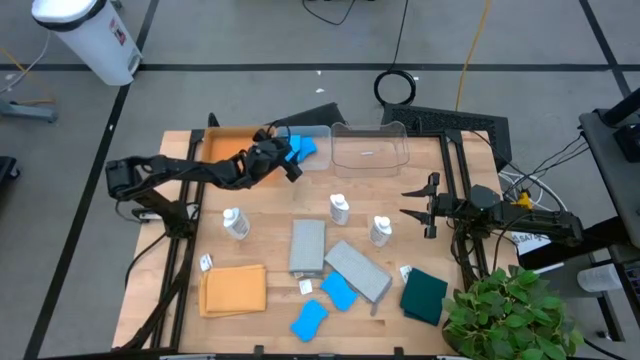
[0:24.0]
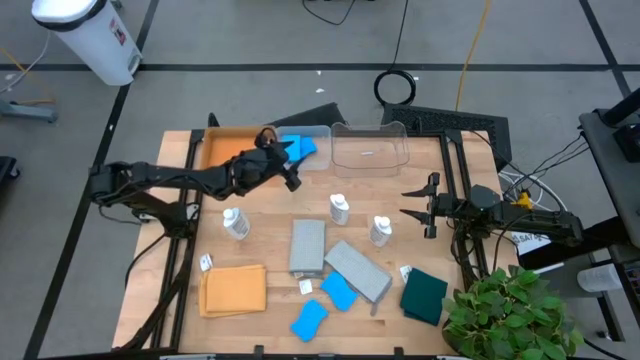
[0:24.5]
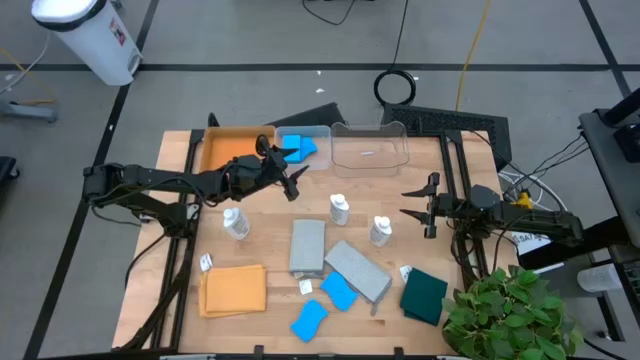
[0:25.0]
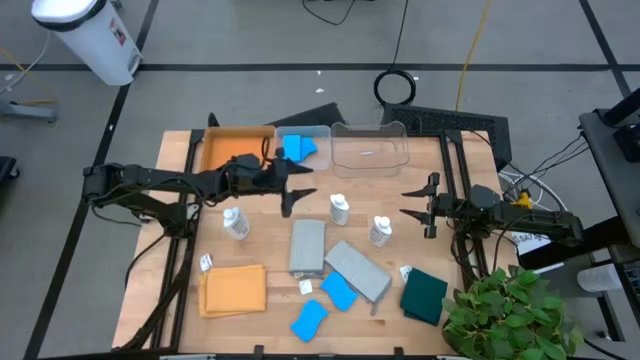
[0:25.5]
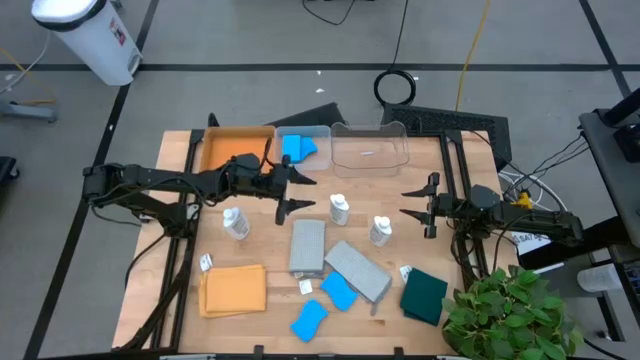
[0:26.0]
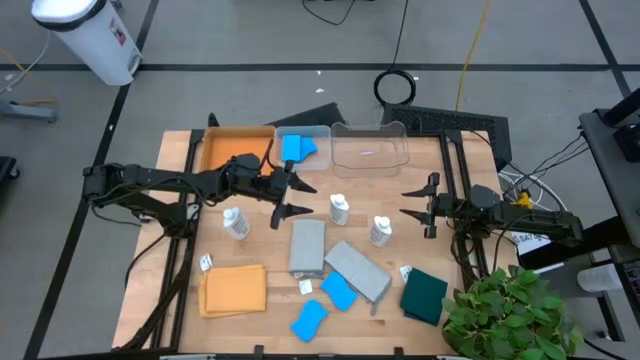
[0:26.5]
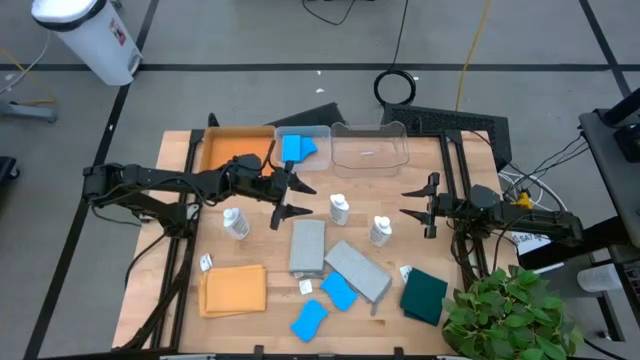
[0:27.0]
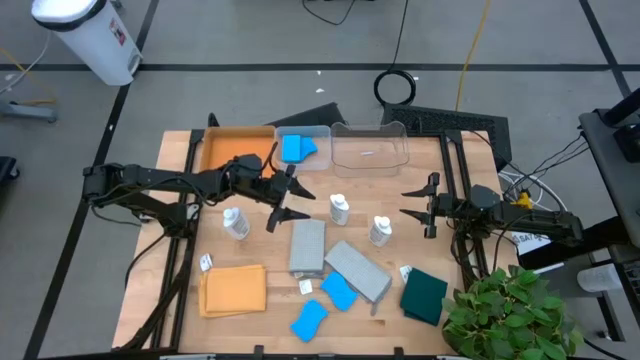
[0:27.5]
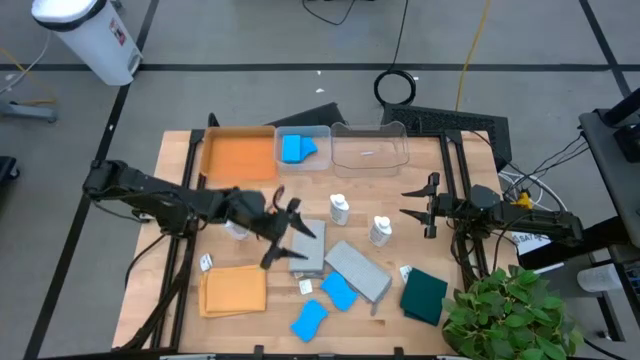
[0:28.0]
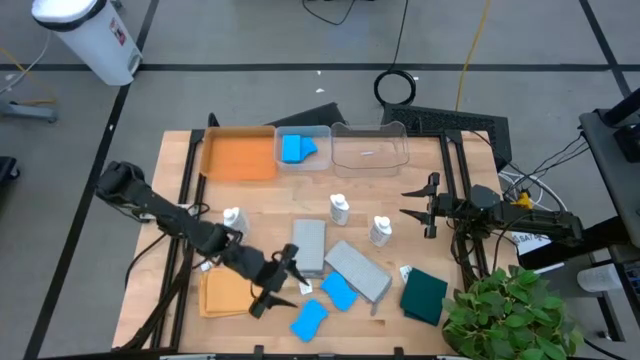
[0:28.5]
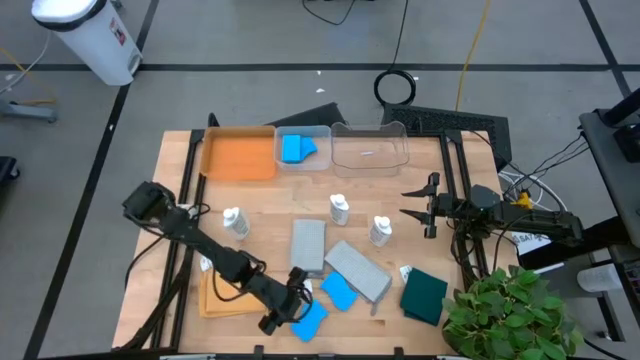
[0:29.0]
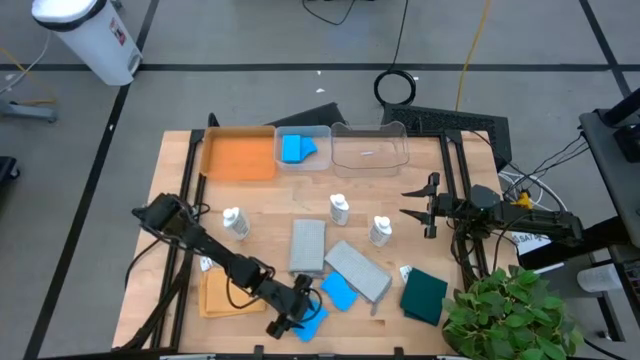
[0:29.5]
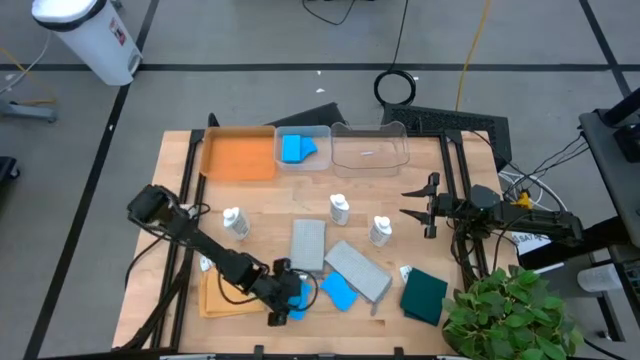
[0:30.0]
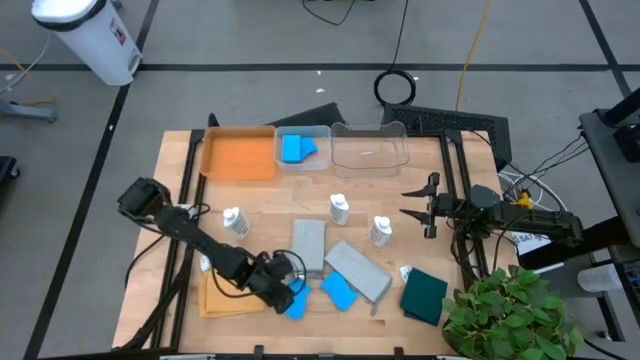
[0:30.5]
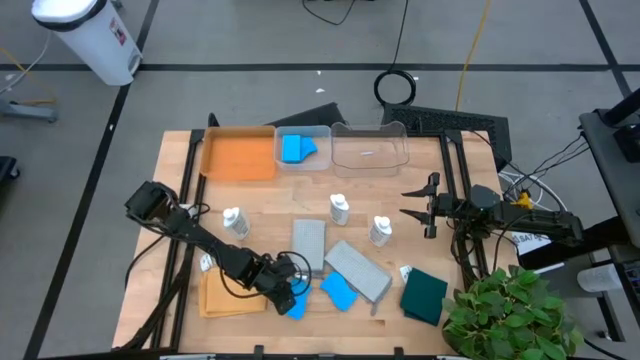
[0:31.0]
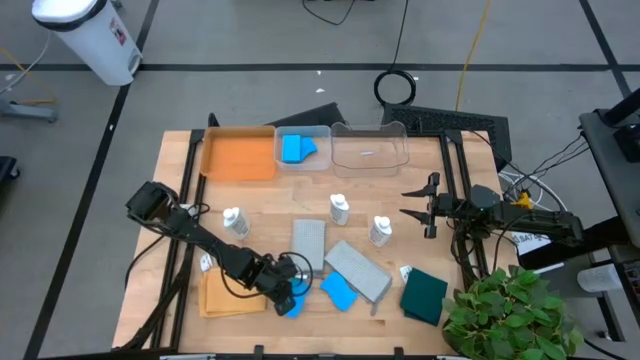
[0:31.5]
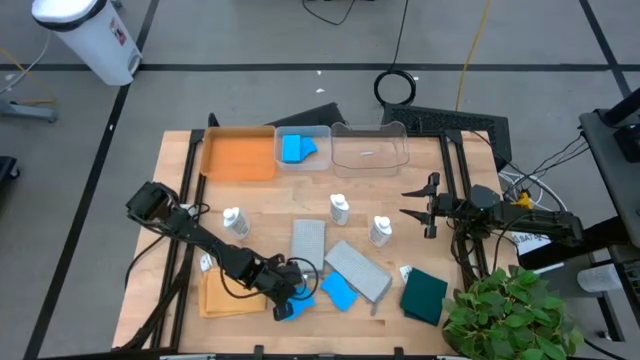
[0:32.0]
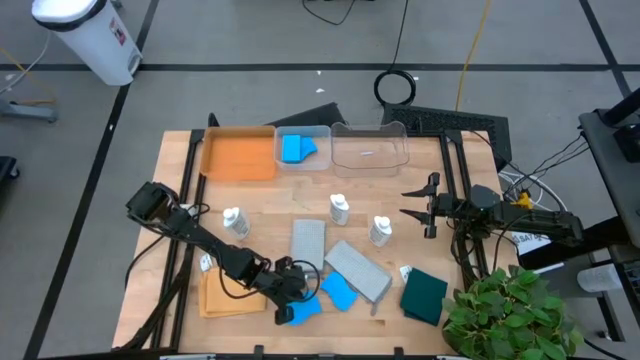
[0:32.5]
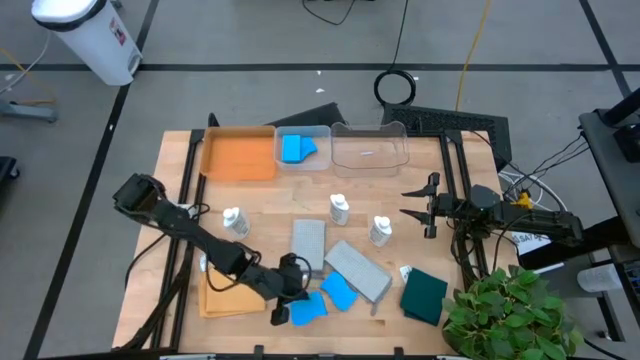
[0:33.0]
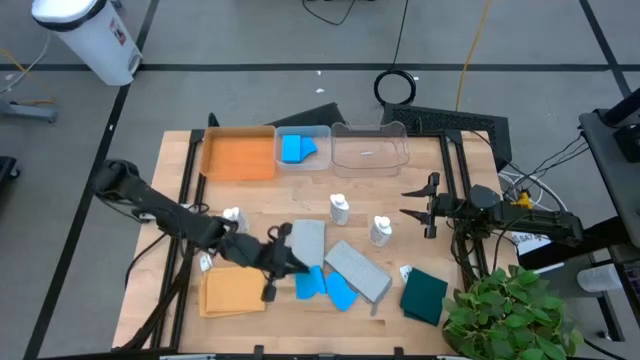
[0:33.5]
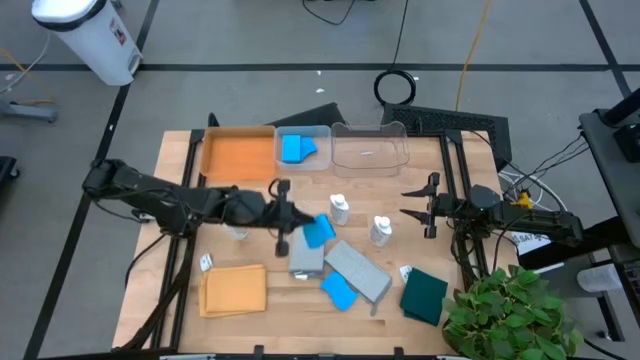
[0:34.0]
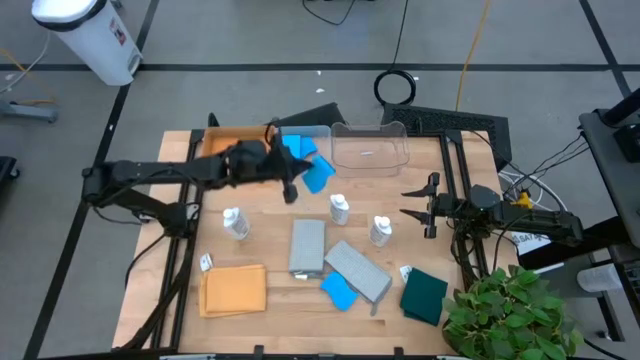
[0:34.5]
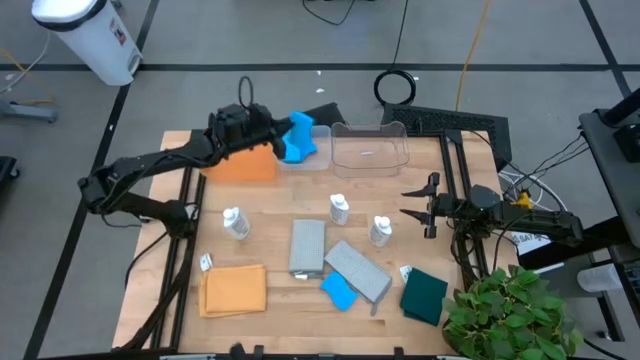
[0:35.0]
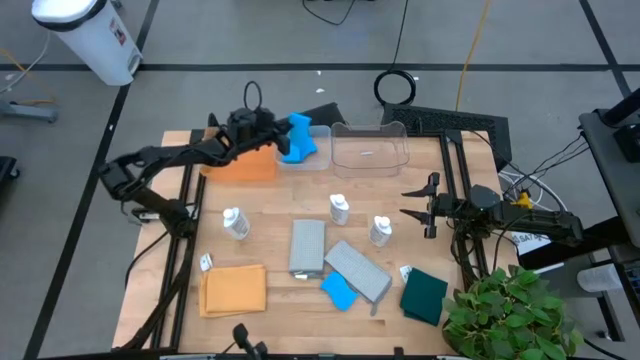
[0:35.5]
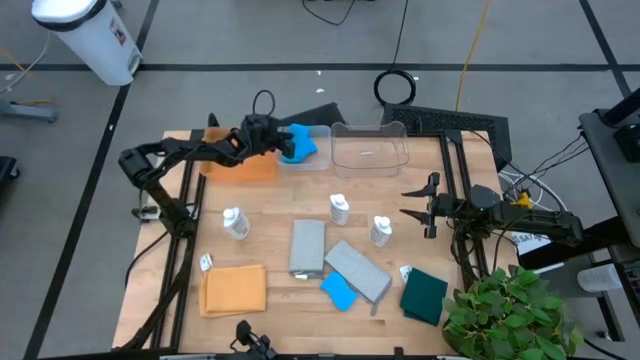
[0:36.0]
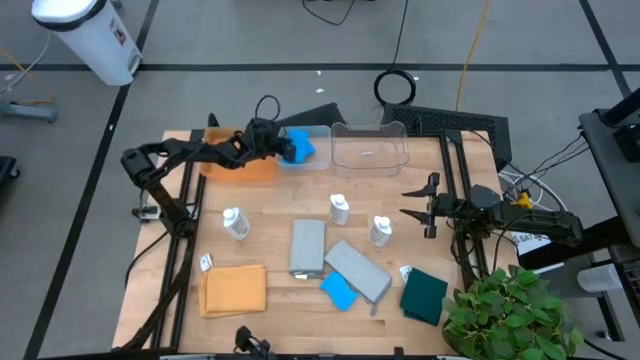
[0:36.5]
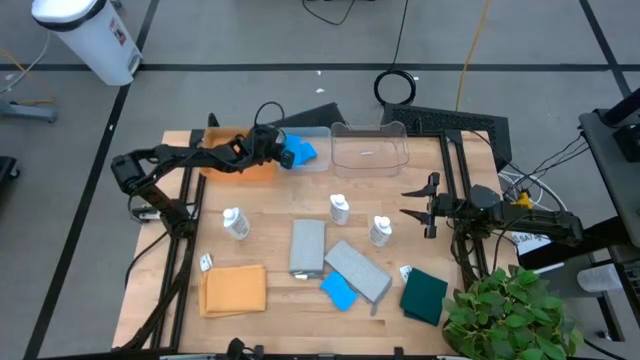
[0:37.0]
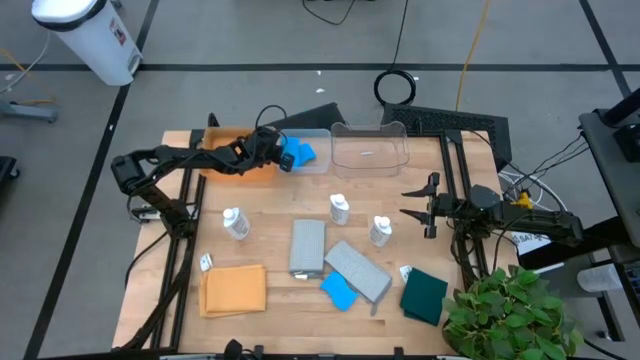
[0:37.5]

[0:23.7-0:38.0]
Task: Pick & Place Kitchen Items
Put the blue sponge into the left transparent bin

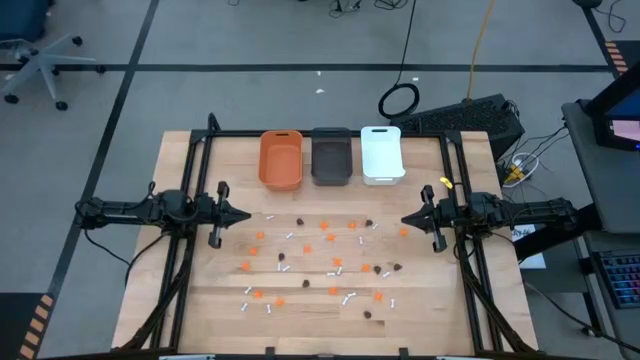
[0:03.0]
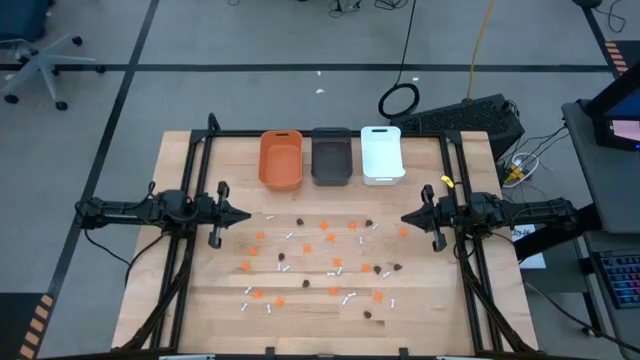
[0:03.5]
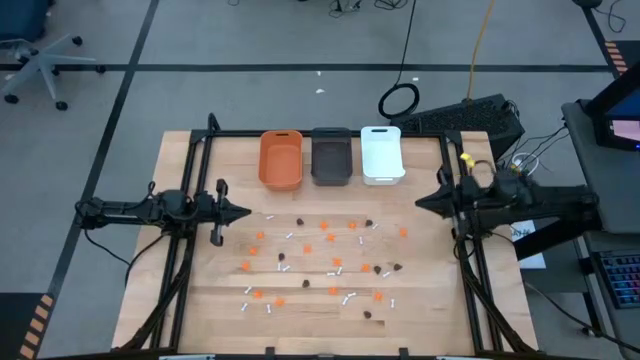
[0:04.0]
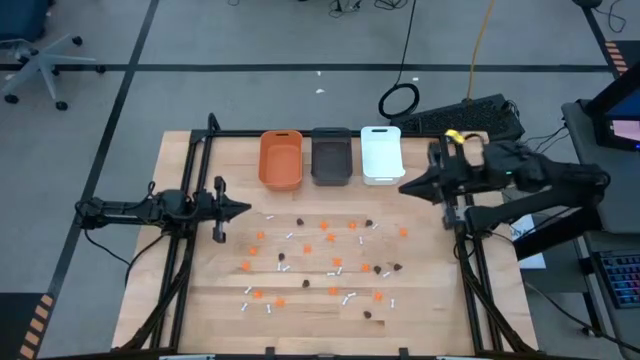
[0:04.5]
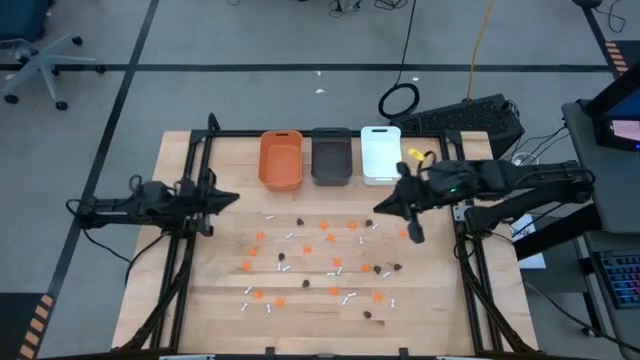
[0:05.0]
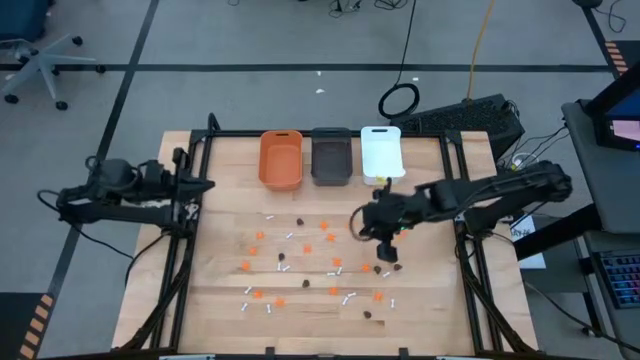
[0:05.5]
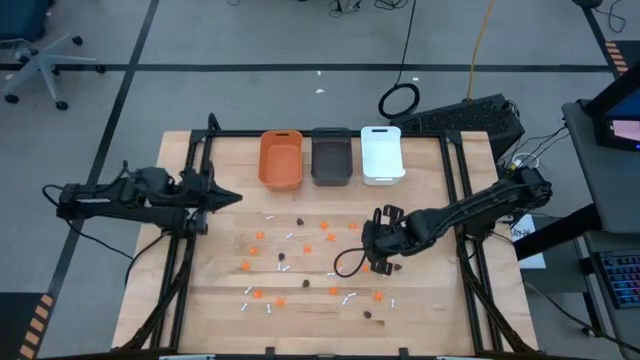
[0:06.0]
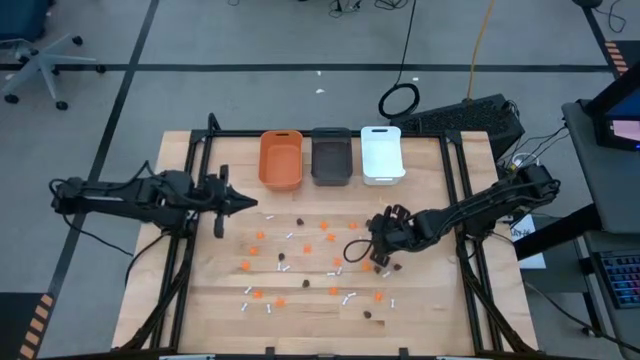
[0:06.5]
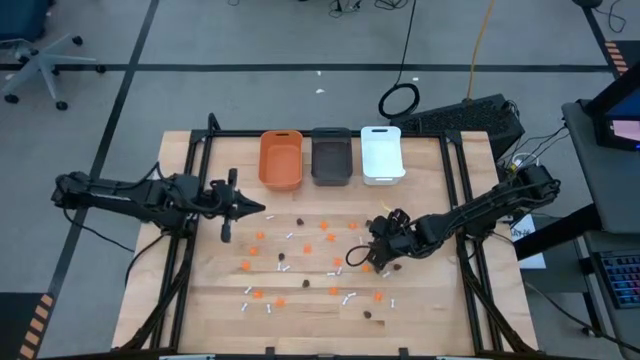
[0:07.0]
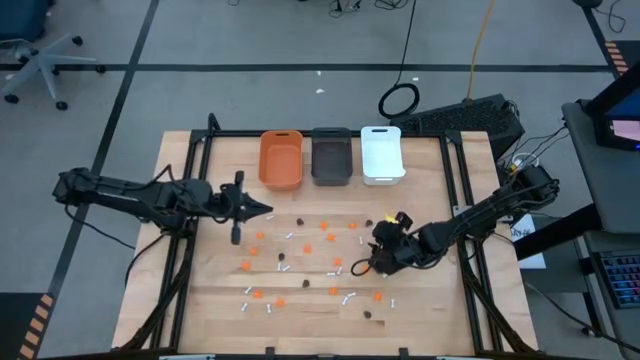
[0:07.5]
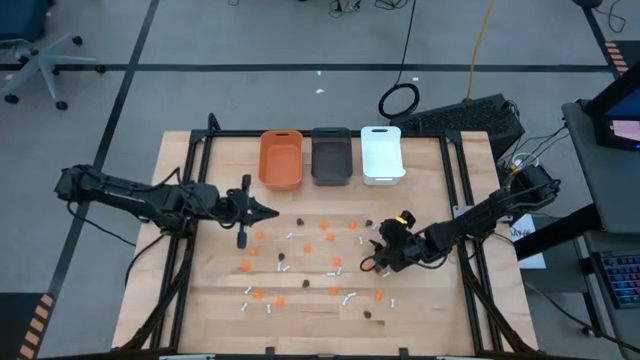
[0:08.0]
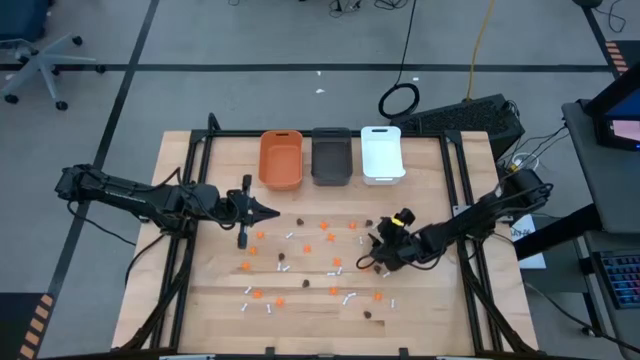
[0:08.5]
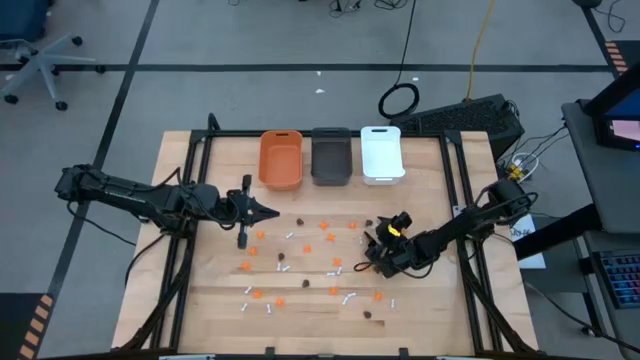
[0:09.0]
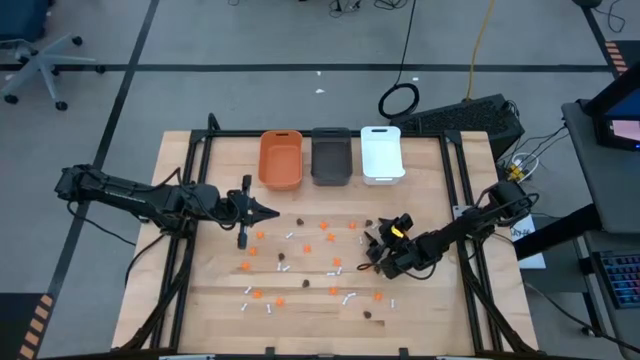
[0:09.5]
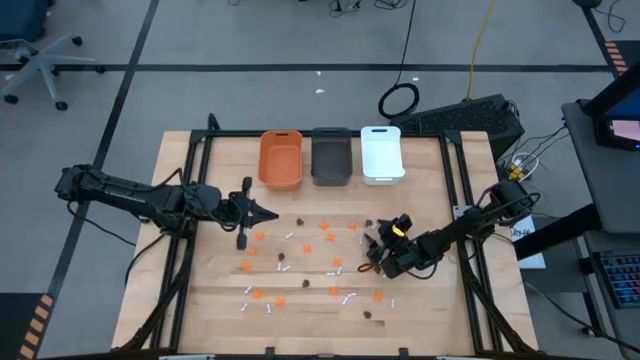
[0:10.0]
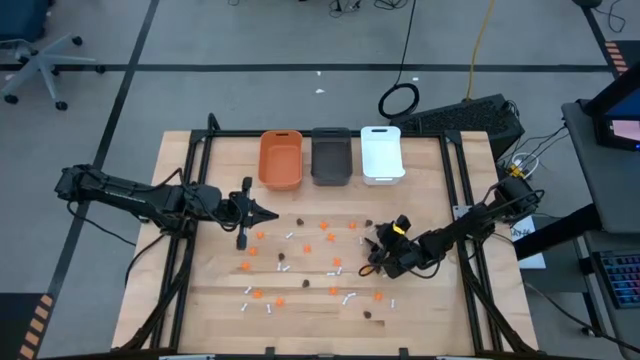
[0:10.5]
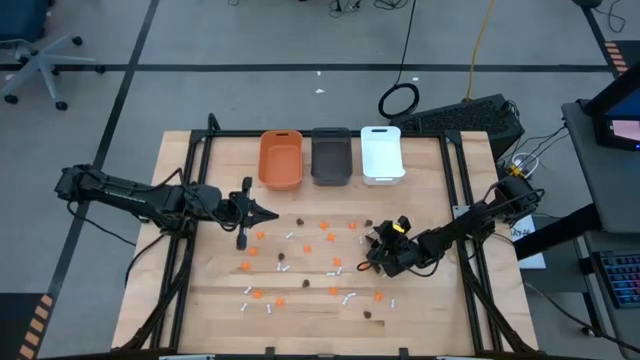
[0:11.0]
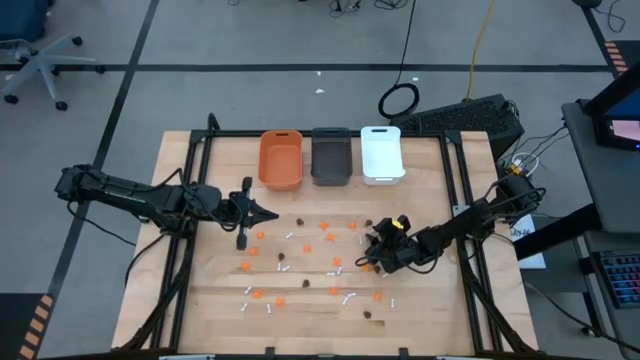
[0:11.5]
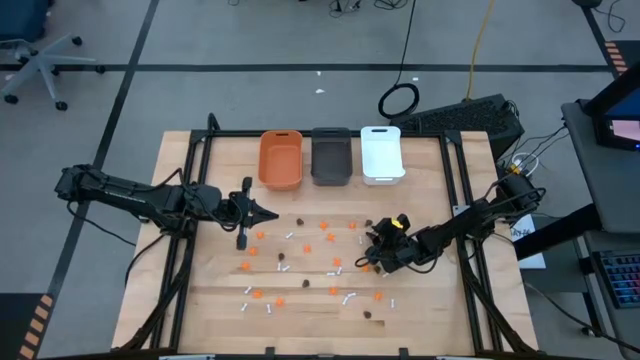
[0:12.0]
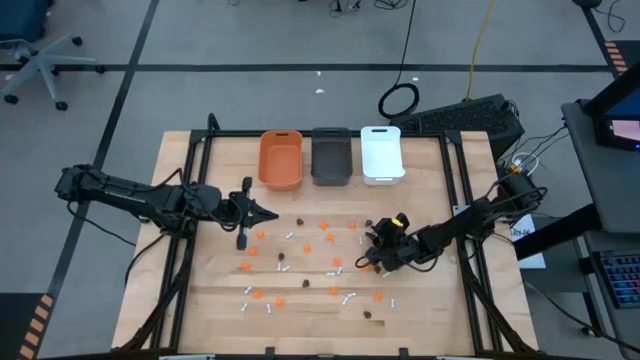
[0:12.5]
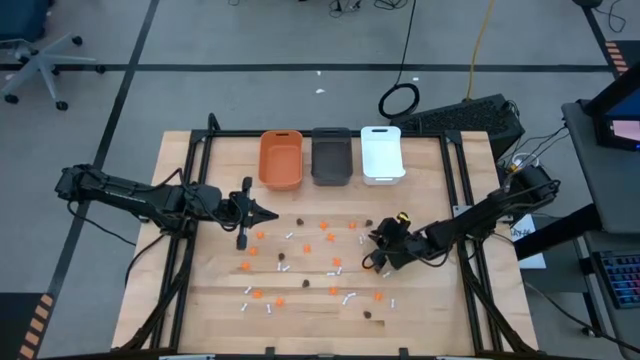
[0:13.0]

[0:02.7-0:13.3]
Task: Sort Halloween decoration
Put the white bone toy into the white bin
